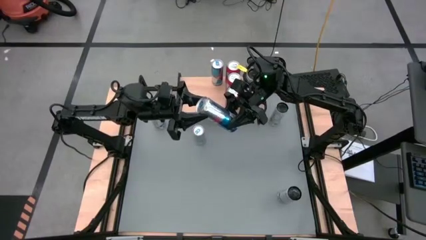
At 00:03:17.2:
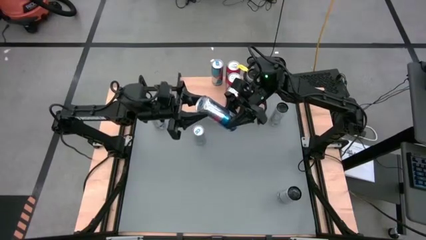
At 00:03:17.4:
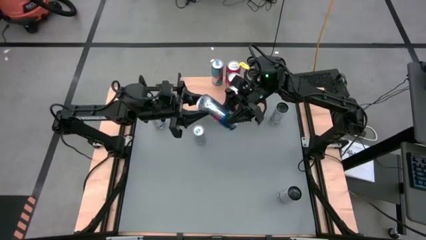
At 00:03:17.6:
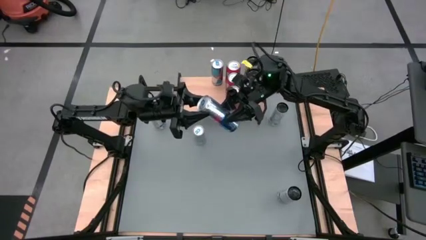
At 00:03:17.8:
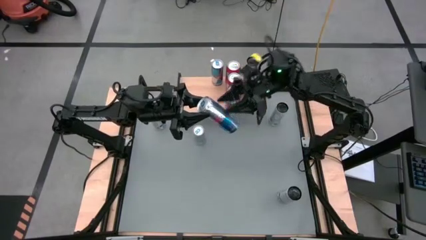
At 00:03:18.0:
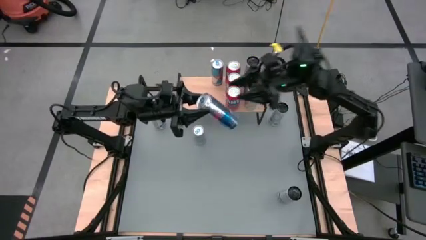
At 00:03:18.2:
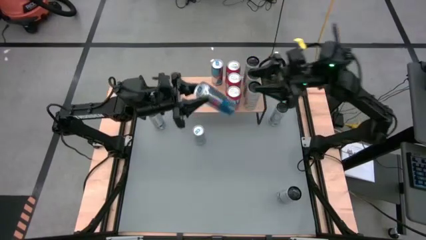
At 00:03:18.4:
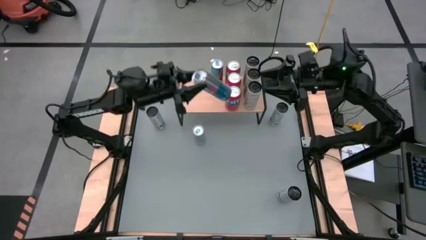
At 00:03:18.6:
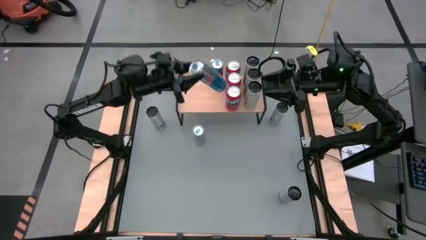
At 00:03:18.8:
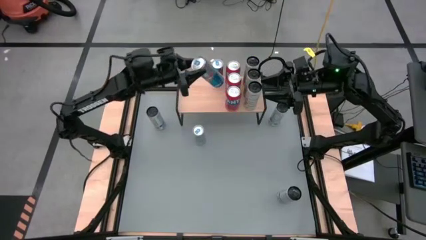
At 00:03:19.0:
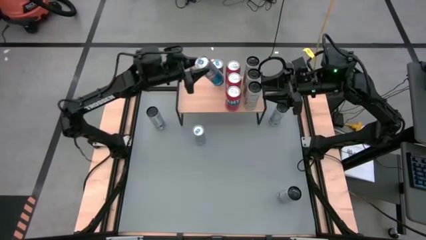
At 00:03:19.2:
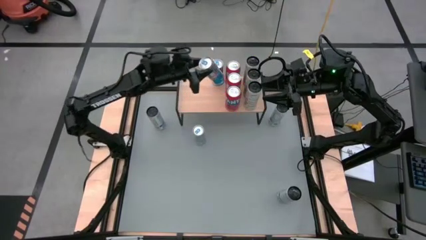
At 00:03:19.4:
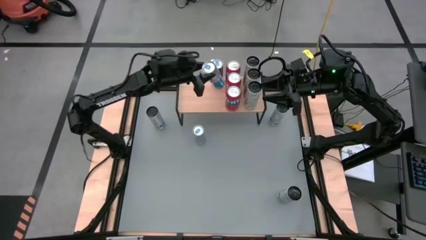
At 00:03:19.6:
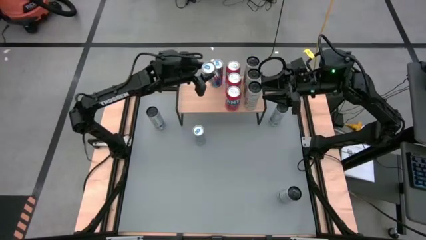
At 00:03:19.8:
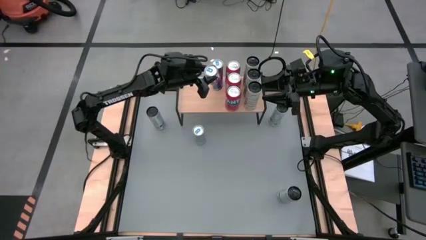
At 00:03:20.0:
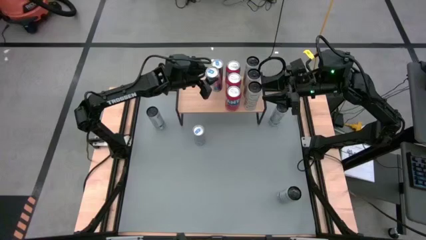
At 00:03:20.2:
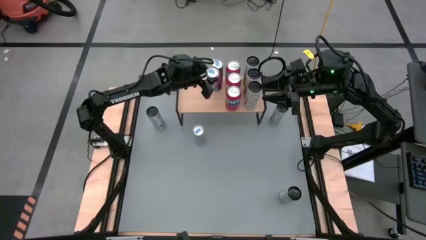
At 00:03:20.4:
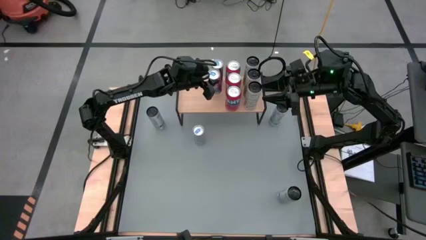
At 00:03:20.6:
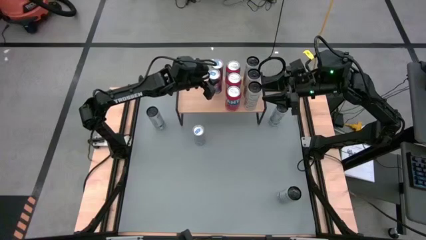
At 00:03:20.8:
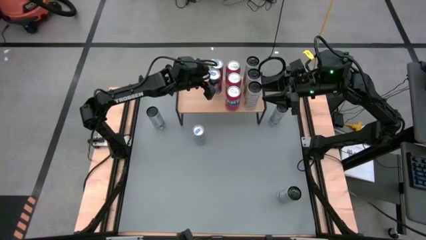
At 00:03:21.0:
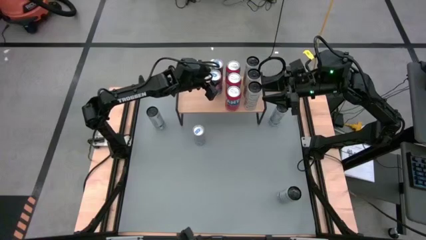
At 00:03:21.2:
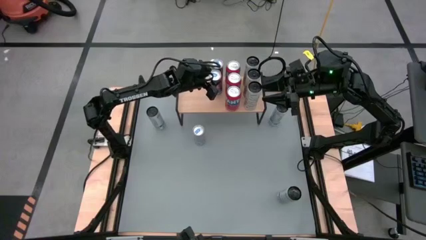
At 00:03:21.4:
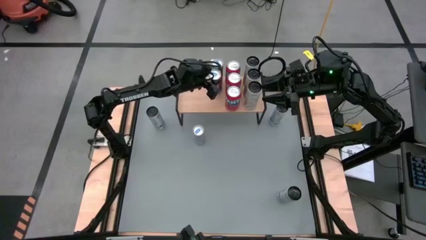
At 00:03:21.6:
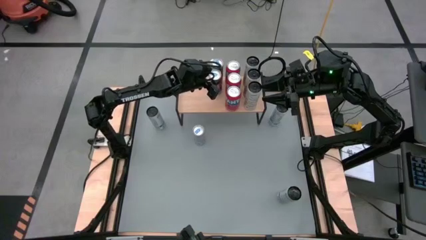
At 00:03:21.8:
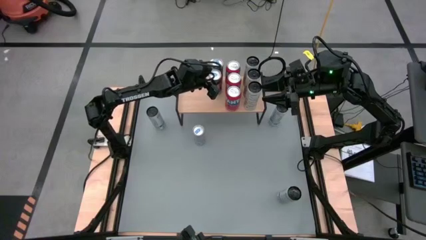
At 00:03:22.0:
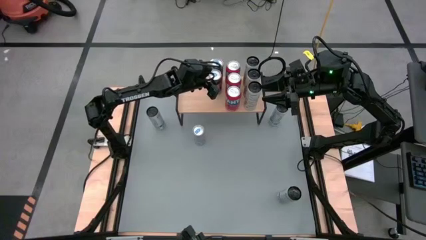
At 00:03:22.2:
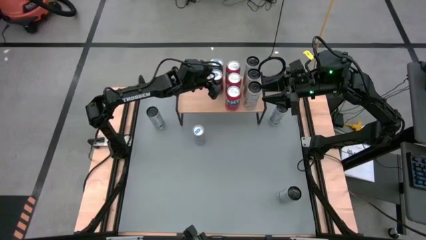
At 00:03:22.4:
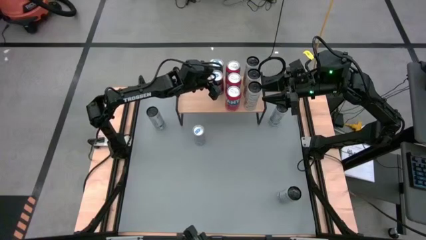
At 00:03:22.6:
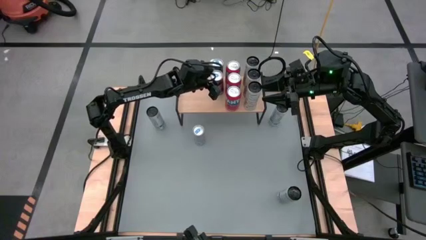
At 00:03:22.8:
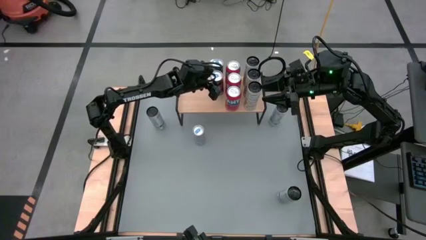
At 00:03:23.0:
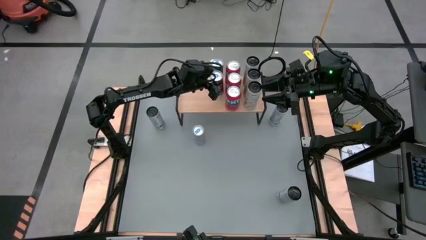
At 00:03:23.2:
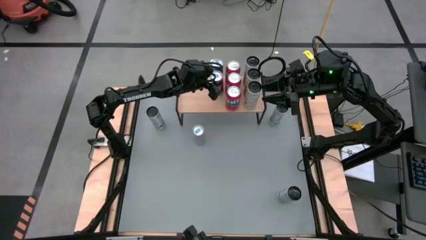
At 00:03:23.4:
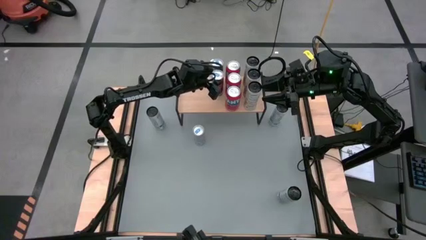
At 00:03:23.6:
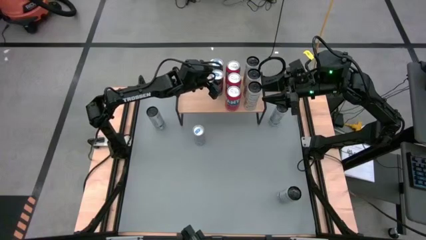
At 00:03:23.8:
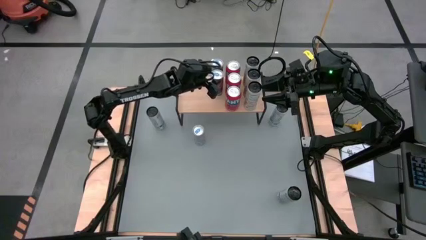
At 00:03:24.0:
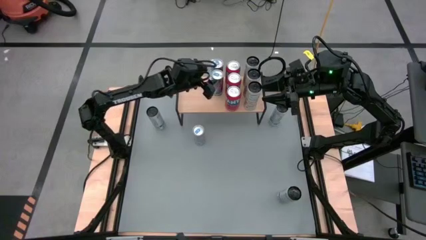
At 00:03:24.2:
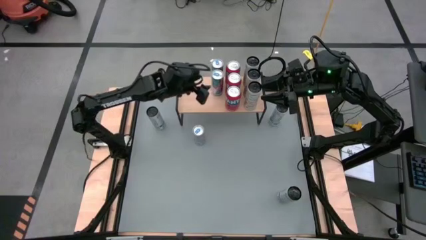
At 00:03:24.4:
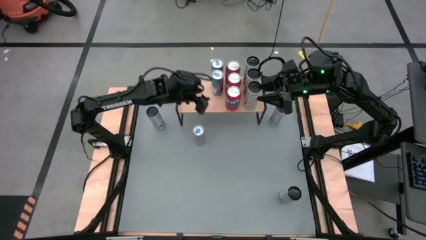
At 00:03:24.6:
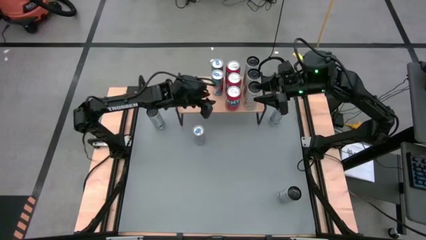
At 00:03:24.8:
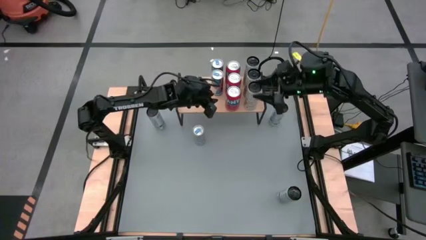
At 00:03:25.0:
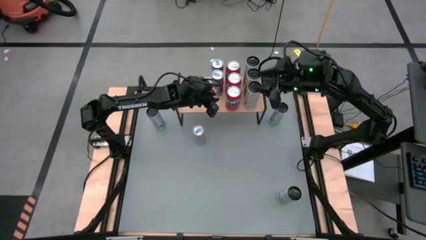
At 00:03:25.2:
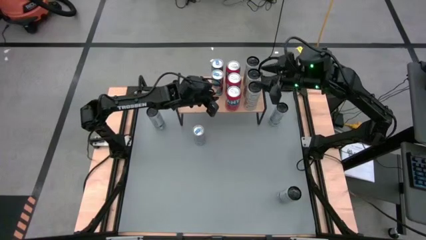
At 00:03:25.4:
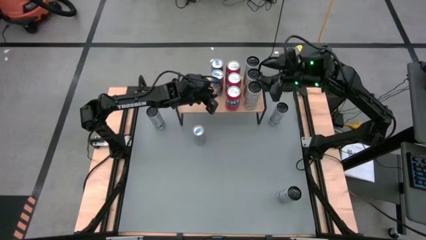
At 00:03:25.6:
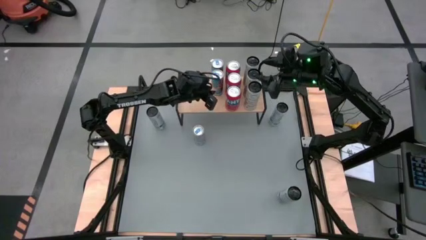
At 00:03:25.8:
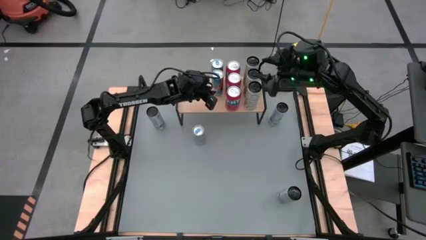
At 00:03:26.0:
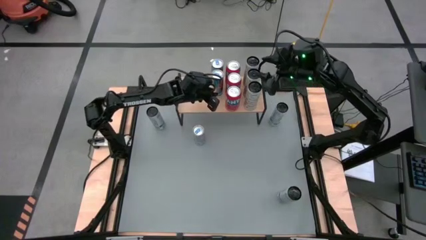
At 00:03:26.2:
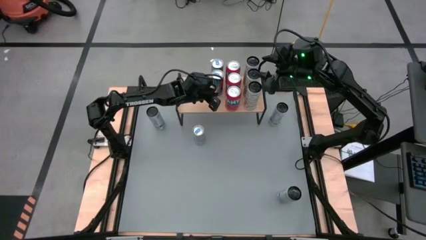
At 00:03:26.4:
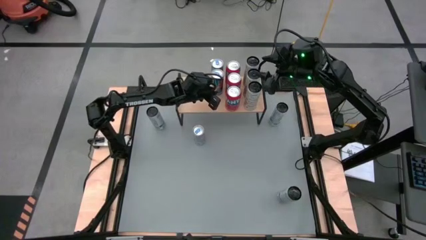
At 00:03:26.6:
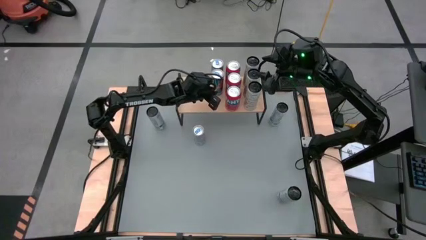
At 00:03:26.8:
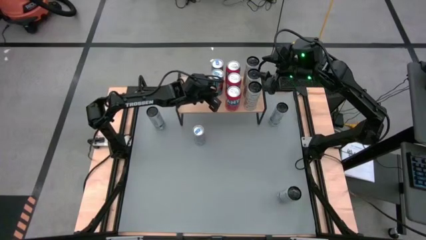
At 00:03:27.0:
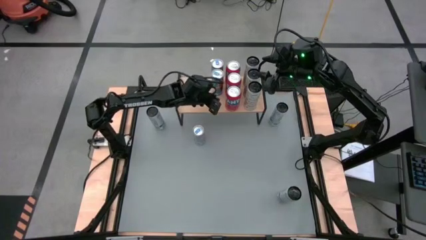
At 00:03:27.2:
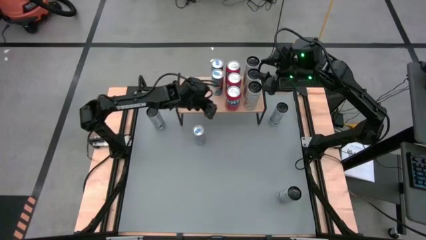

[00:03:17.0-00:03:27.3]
Task: Place canned beverage on shelf
Put the bottom blue can on the shelf aligned with the other blue can

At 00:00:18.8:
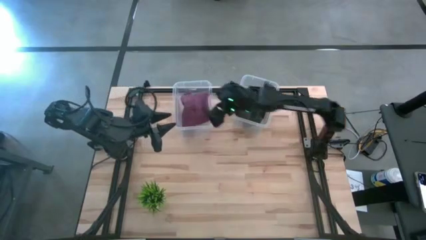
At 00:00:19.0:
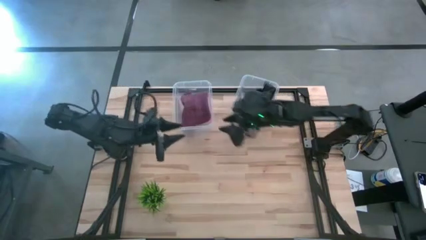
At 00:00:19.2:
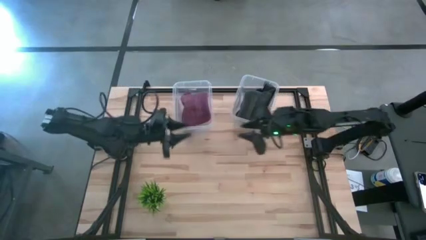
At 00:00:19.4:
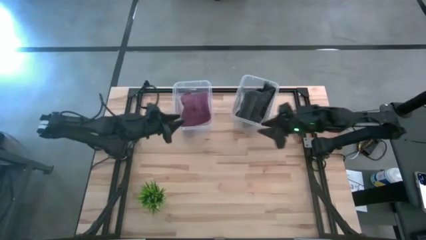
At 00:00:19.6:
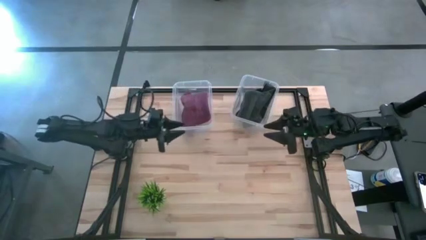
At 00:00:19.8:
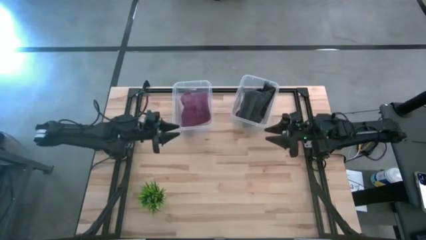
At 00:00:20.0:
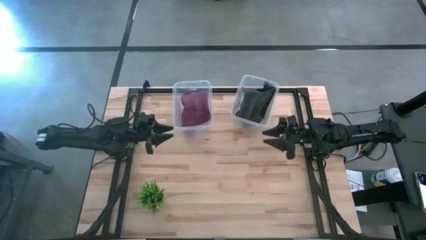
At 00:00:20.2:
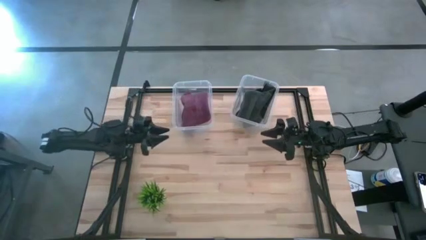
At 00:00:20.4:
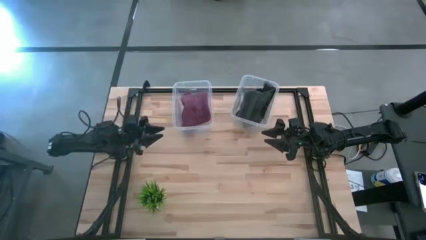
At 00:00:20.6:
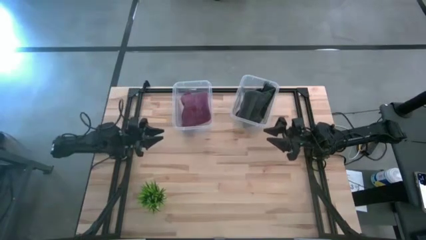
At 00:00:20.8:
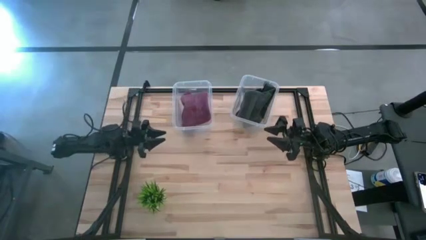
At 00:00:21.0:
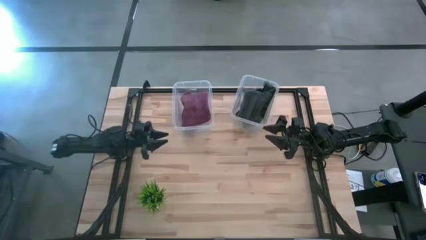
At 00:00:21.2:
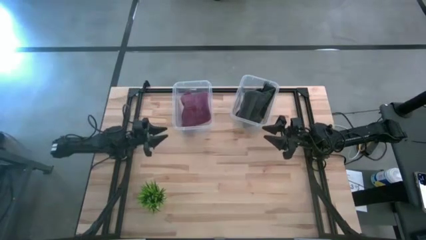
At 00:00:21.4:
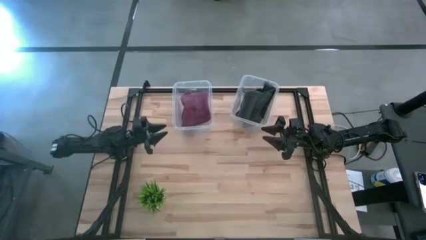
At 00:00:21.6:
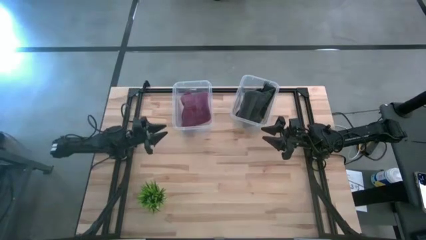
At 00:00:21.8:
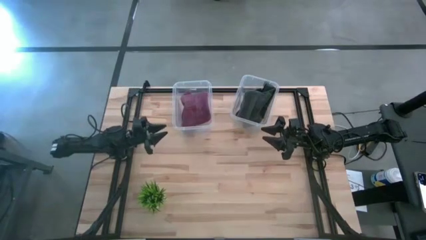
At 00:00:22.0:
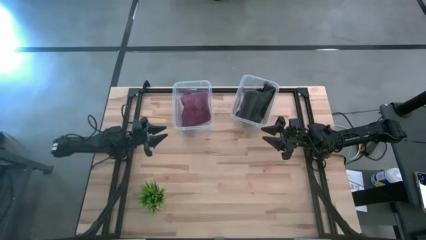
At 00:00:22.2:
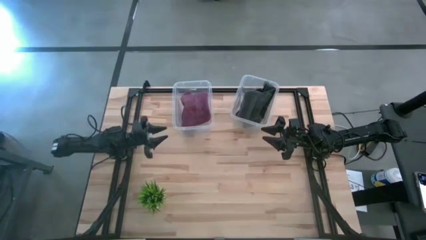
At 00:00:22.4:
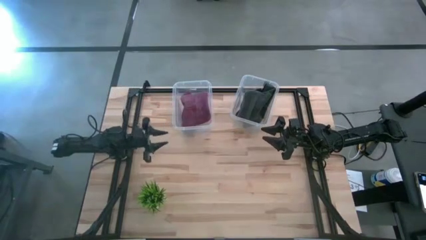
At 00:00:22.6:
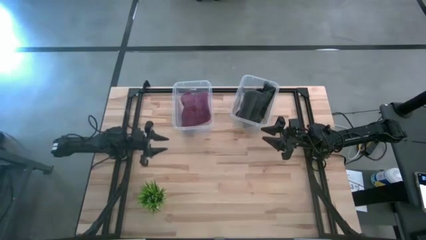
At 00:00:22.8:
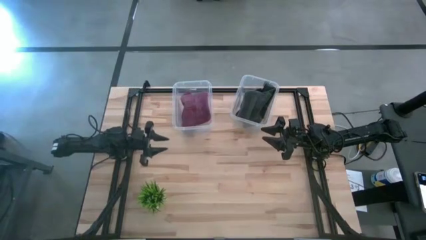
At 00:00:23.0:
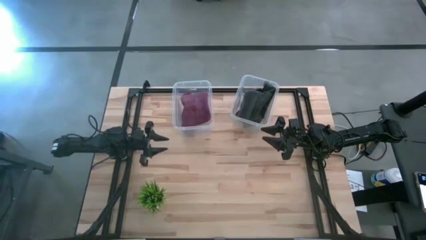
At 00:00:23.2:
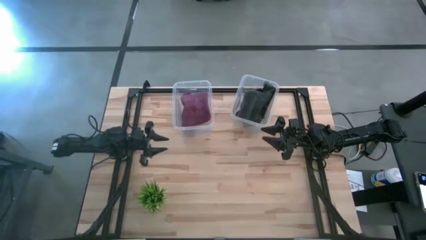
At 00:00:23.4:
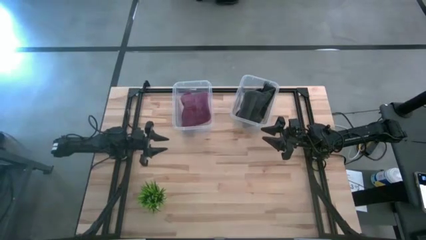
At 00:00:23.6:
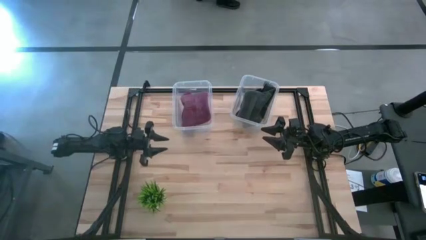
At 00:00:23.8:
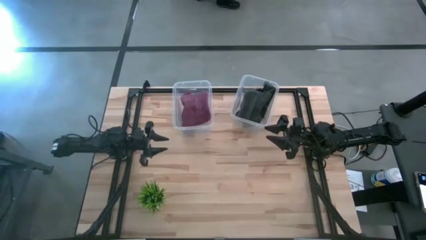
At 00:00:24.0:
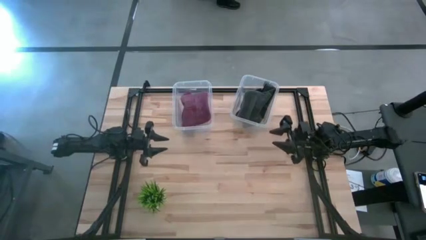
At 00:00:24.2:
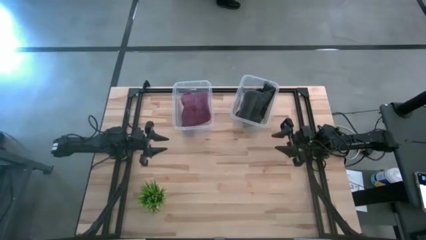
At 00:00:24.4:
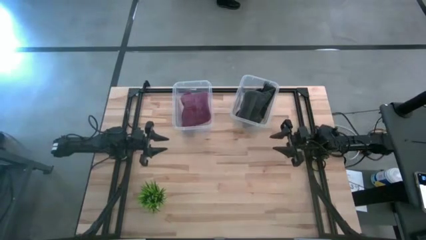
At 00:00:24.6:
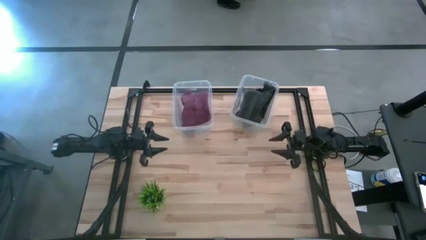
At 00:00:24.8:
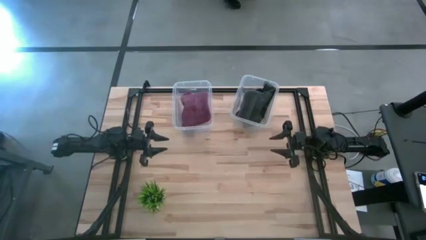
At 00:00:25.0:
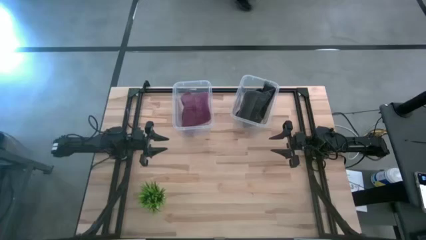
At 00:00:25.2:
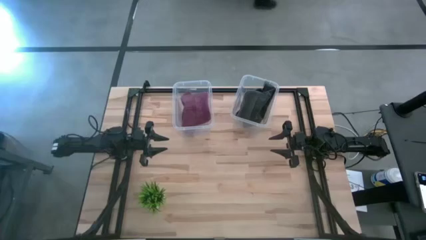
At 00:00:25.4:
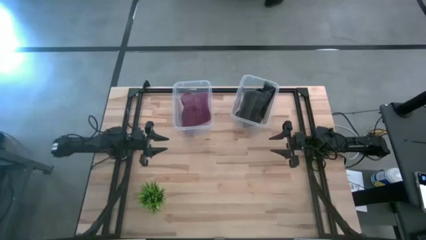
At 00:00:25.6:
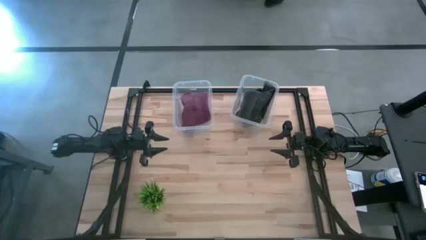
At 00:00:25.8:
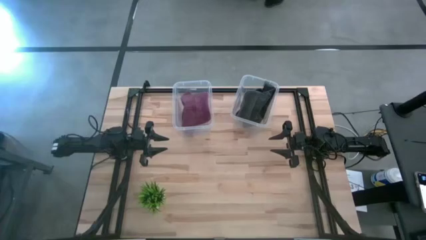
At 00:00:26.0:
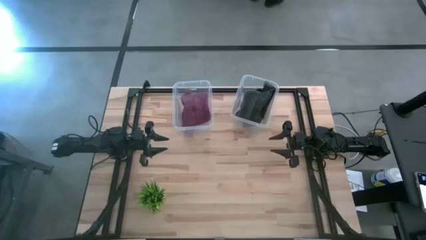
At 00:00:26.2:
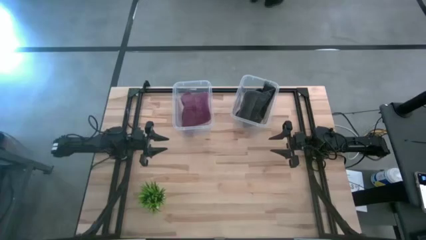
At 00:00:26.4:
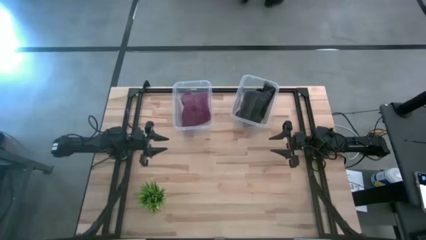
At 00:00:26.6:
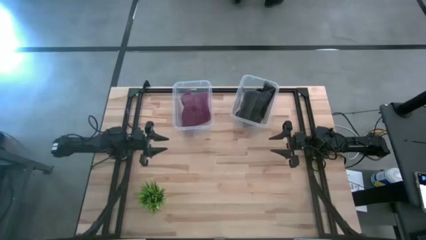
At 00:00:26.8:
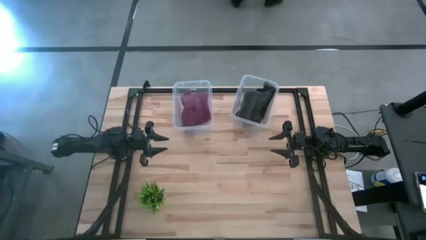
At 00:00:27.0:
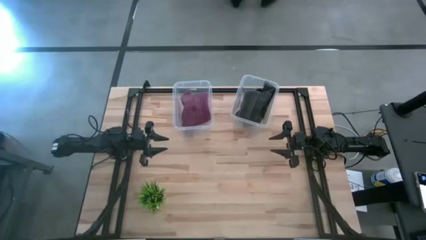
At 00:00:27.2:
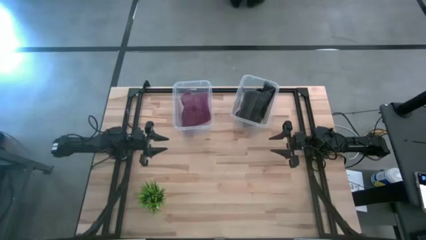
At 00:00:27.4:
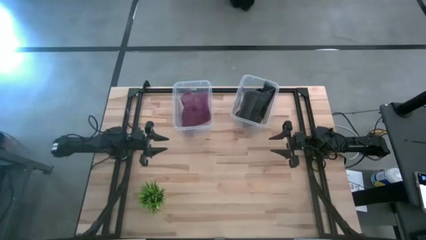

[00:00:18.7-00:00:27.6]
Task: Pick and place caps into container
Return to home position
